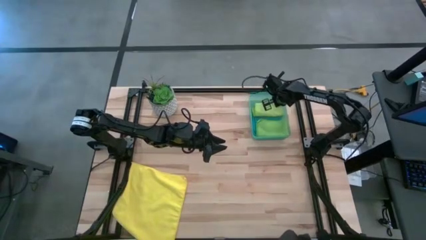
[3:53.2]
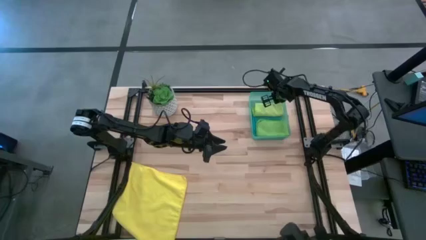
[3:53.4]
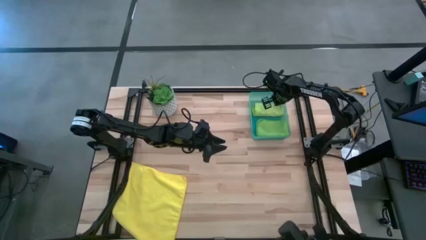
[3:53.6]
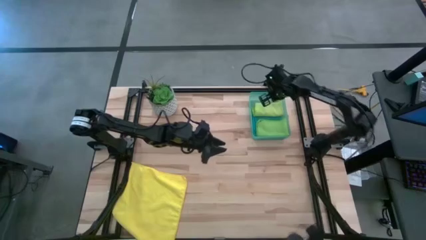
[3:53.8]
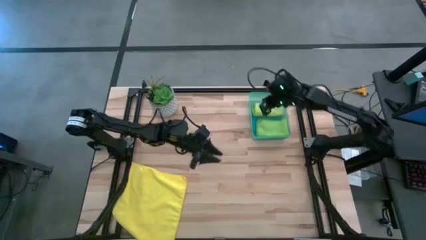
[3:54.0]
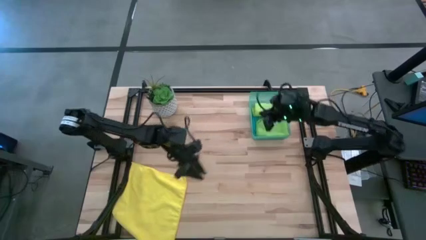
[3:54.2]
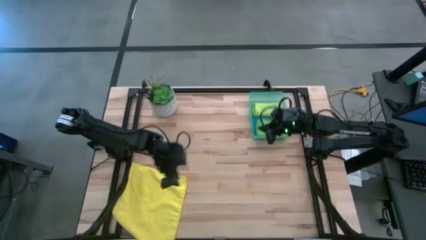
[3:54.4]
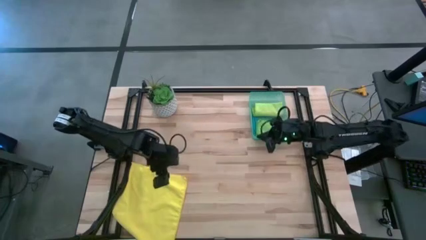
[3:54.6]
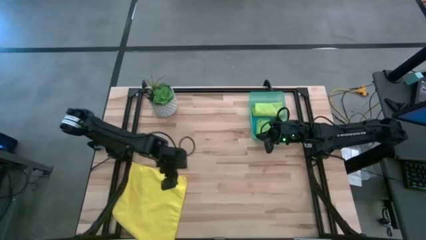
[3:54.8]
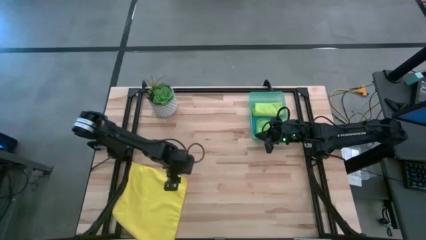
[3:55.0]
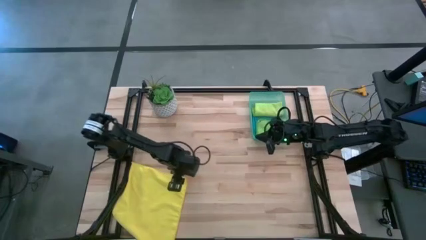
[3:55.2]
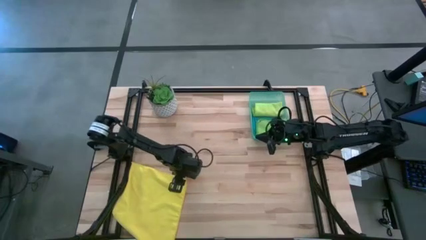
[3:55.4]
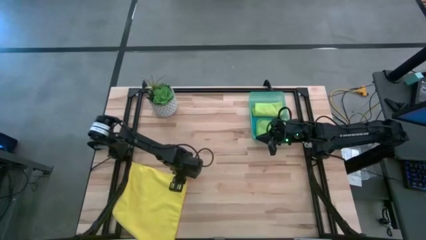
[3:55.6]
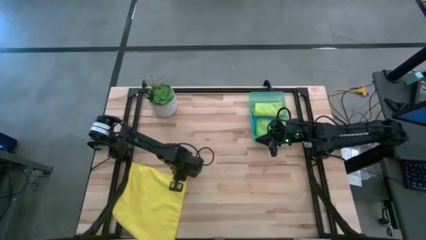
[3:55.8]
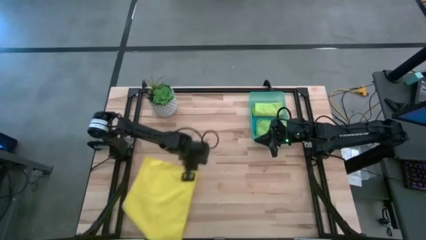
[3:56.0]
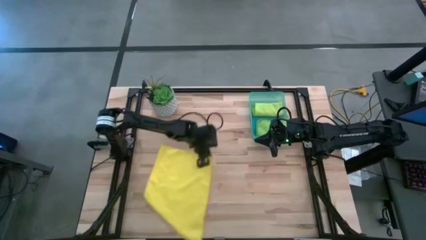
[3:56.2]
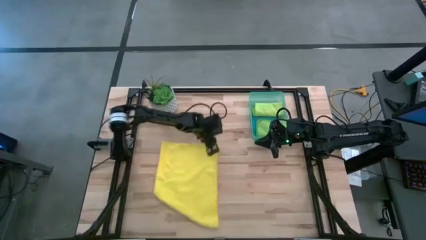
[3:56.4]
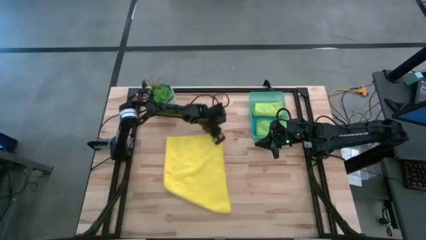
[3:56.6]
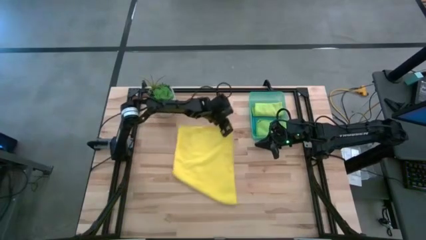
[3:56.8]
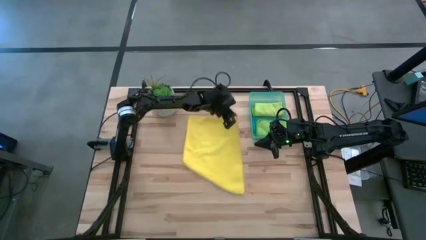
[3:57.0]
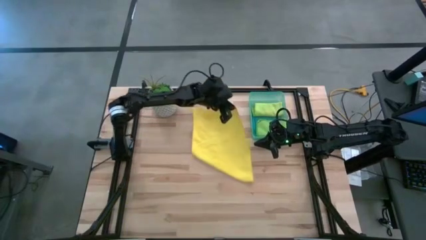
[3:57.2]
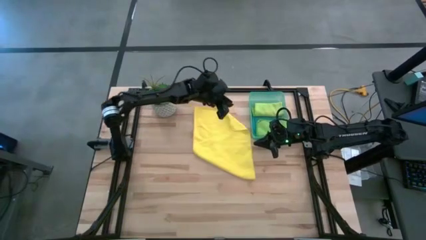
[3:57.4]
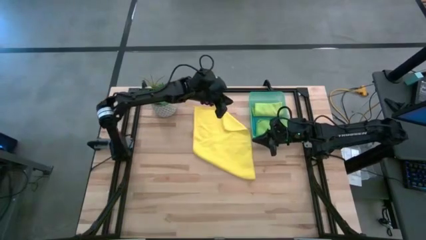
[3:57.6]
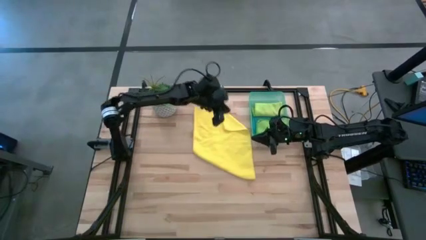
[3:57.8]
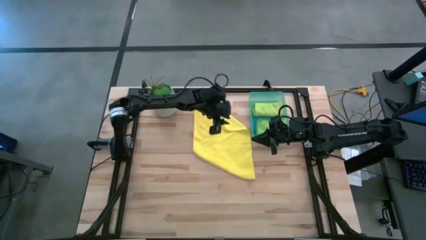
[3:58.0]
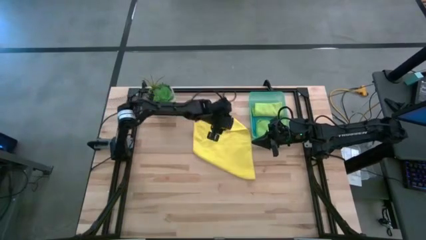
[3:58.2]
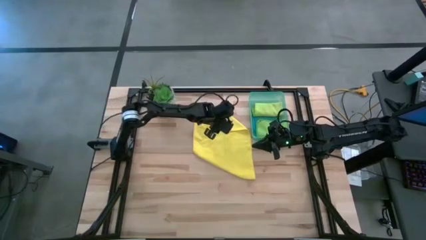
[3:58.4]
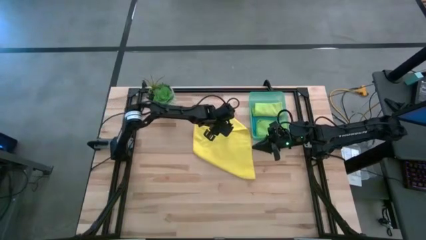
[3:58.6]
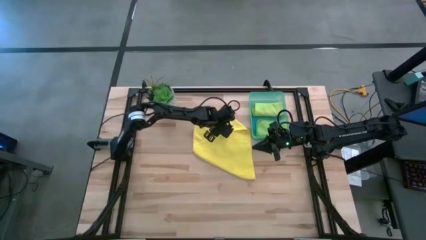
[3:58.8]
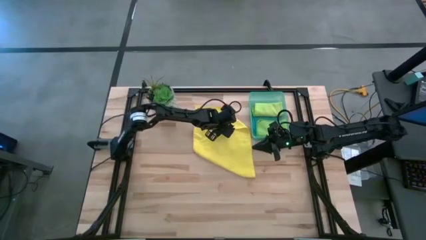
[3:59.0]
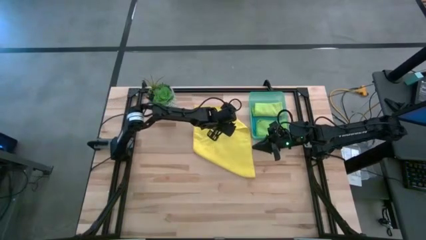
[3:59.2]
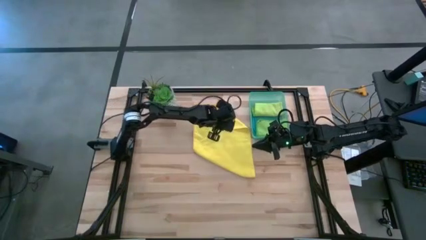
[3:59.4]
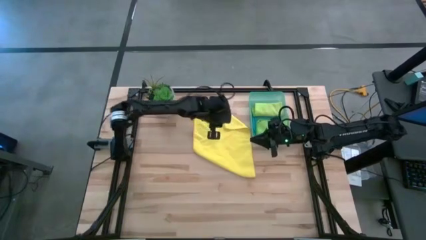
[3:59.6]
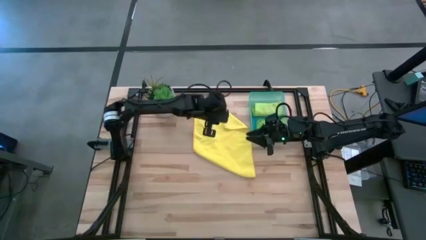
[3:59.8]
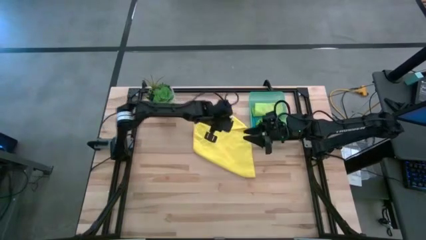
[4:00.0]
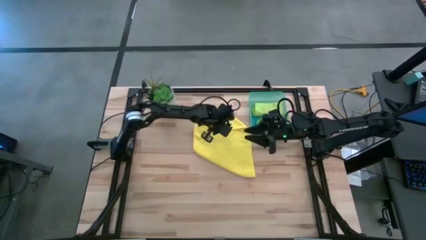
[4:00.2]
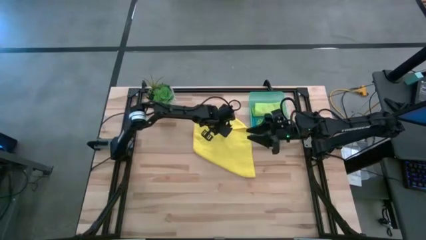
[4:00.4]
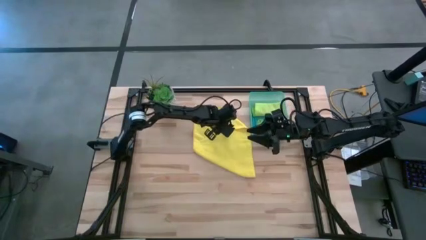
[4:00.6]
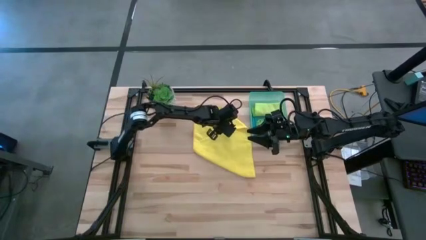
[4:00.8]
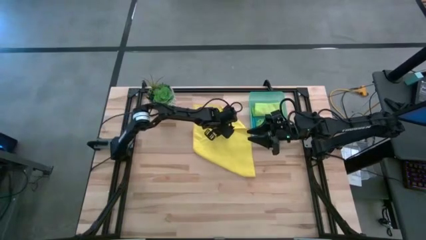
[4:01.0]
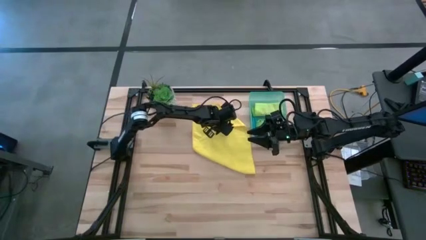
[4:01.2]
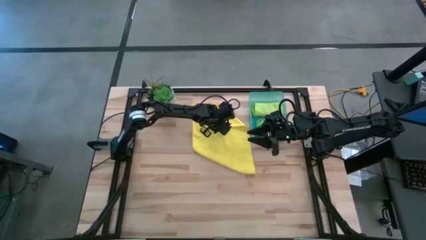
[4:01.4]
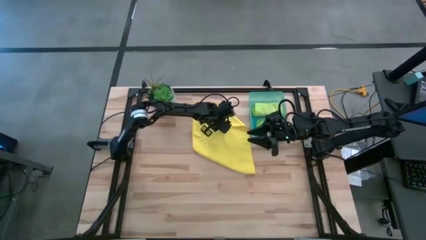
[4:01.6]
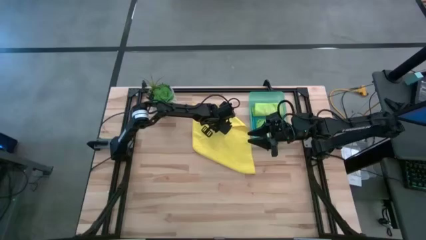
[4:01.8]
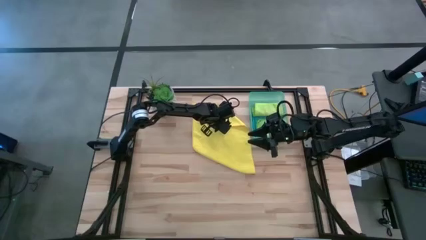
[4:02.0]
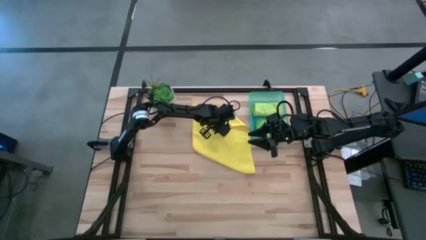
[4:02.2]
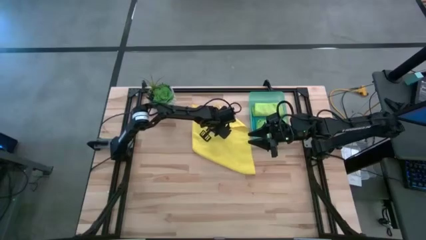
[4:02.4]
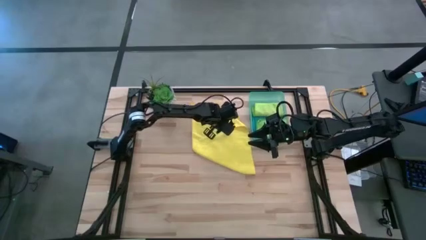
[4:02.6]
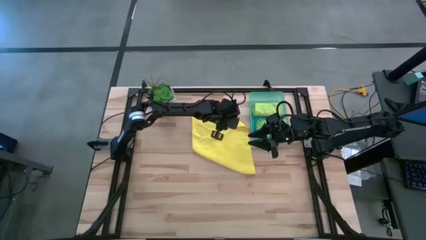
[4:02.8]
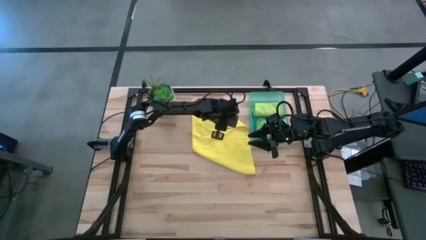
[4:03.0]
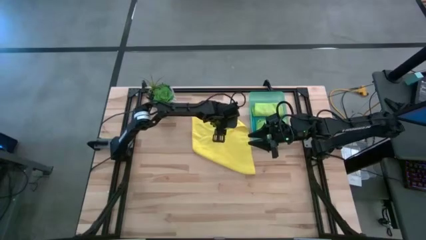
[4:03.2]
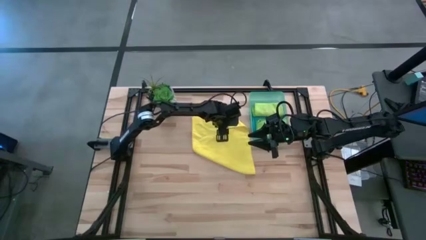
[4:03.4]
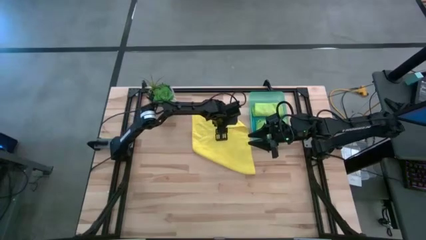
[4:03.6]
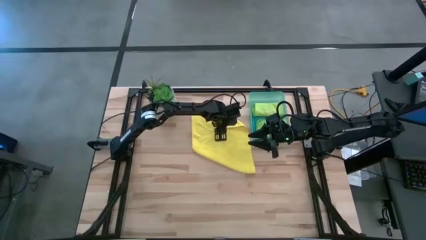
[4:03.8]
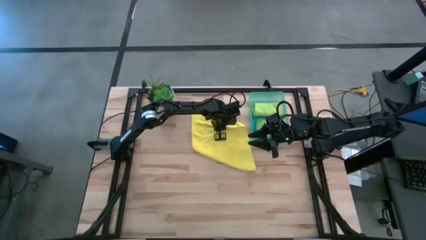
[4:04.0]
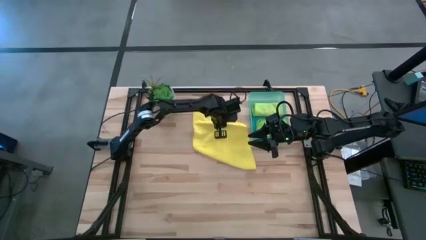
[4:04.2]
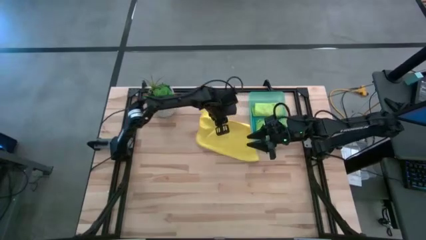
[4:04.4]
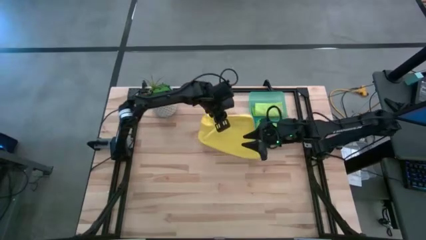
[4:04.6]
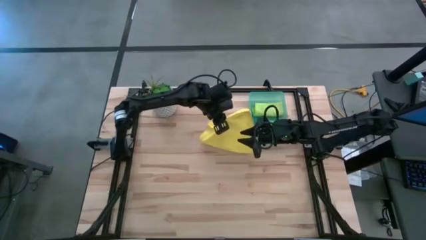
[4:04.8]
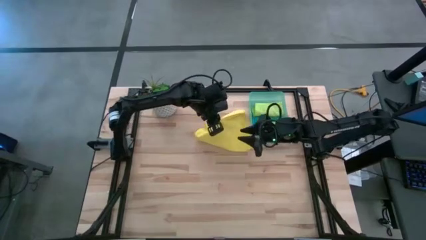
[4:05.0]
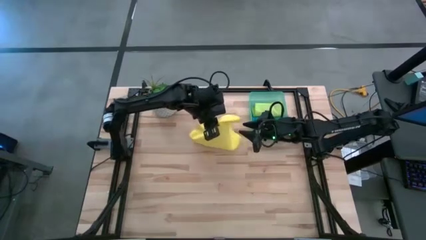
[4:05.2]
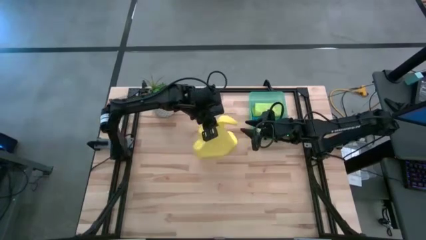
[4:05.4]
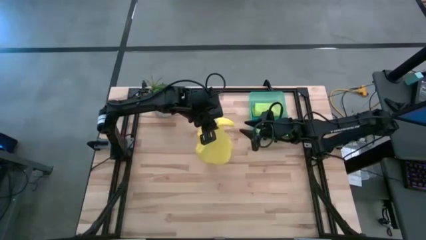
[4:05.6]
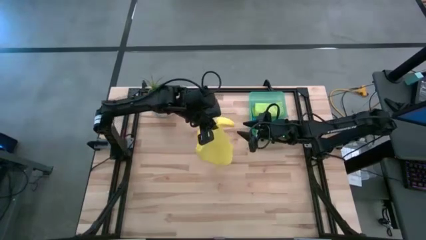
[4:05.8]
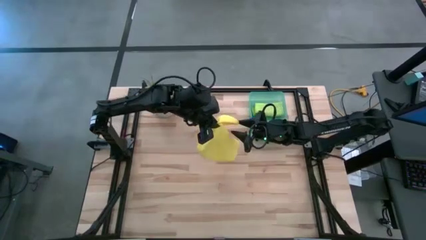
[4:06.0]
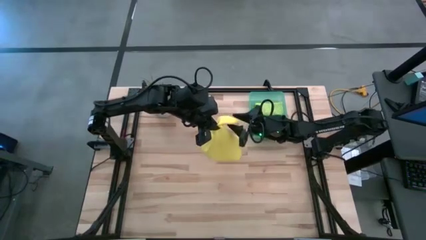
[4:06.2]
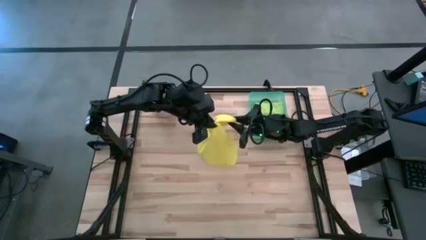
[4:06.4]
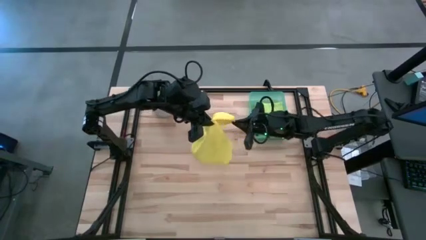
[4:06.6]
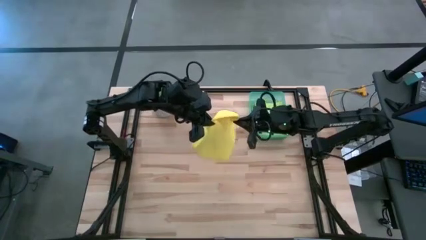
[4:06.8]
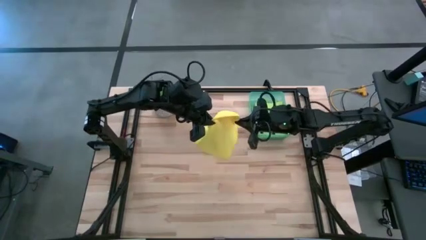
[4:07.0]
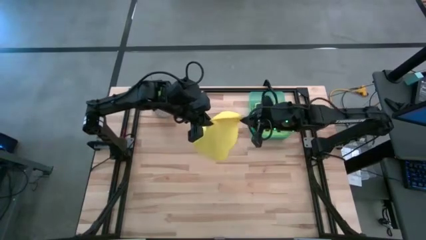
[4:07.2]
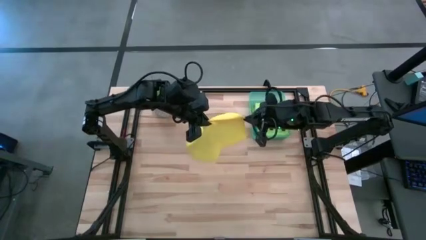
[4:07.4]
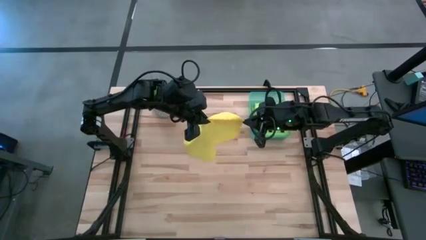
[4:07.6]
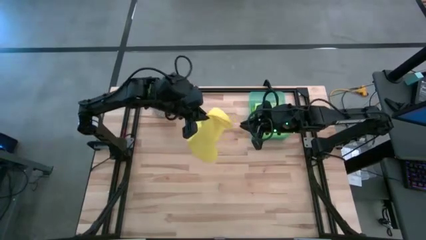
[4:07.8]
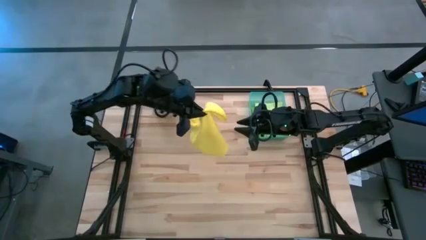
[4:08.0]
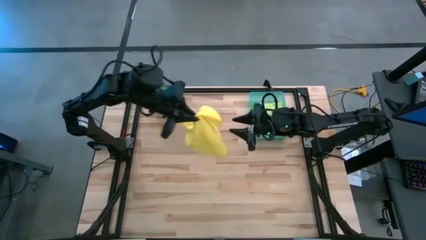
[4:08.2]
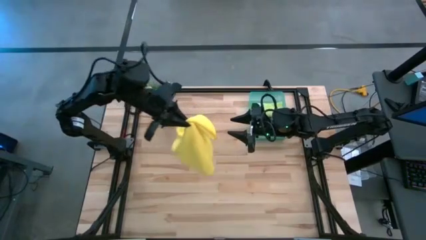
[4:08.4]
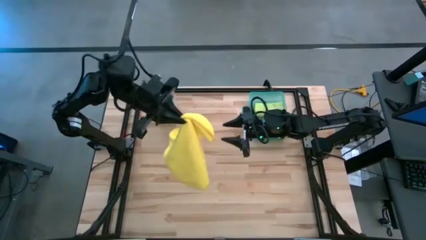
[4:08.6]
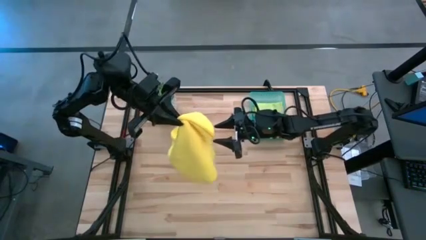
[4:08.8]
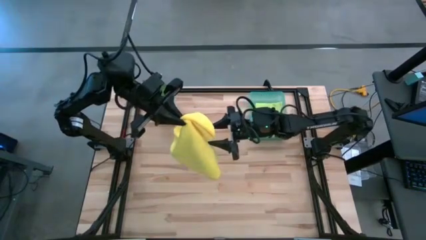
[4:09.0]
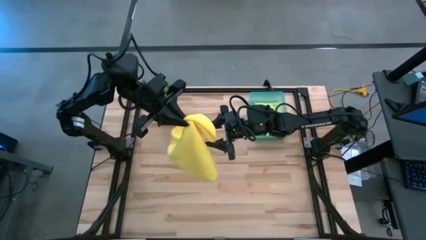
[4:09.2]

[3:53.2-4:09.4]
Task: Fold microfiber towels
Fold the yellow towel
